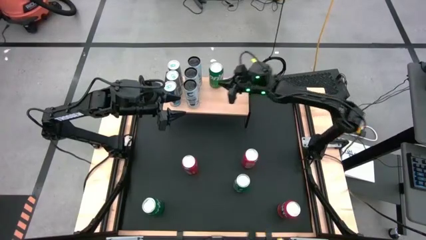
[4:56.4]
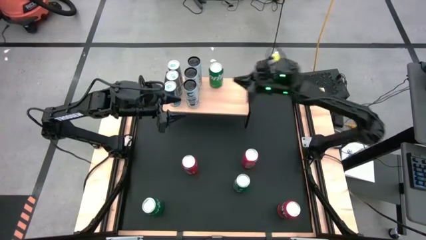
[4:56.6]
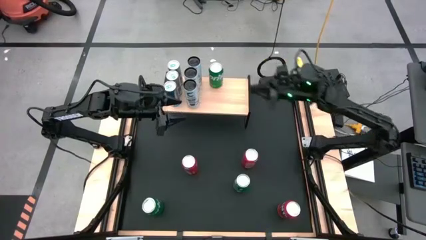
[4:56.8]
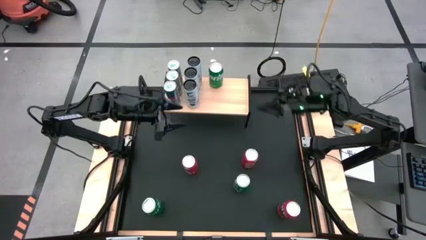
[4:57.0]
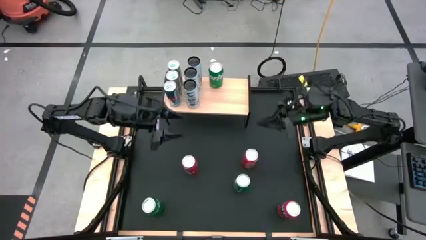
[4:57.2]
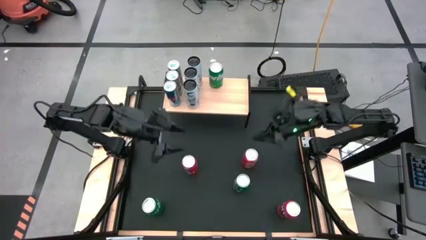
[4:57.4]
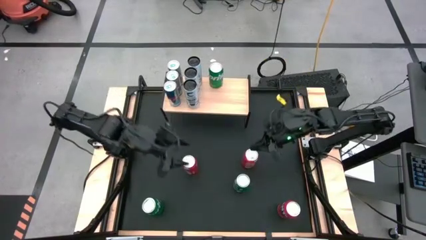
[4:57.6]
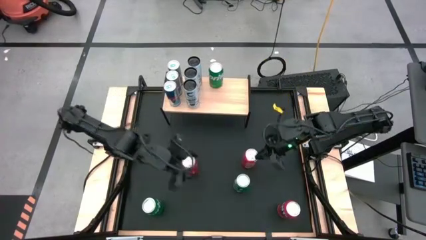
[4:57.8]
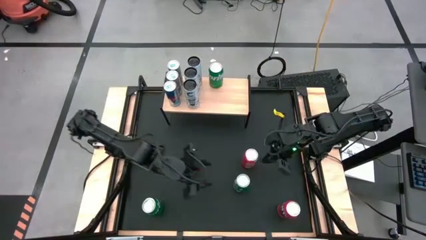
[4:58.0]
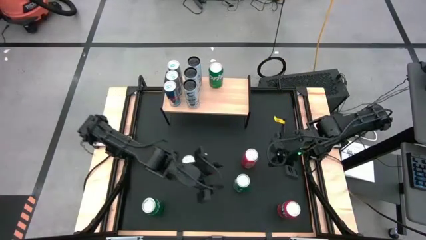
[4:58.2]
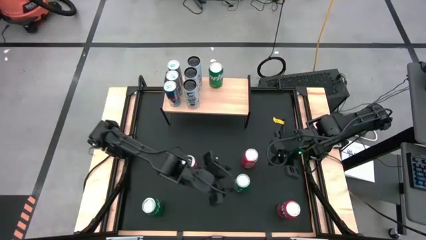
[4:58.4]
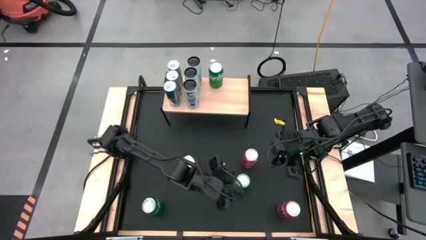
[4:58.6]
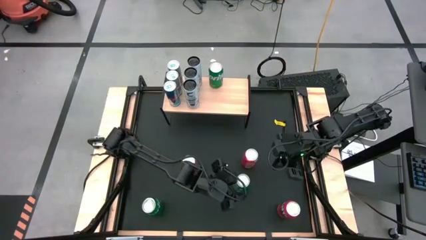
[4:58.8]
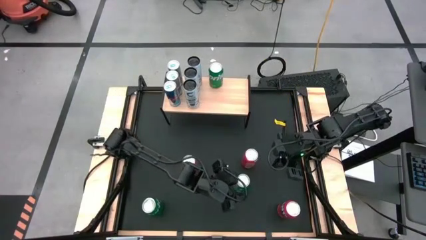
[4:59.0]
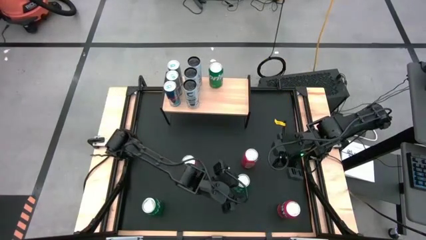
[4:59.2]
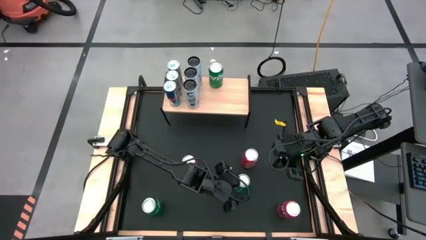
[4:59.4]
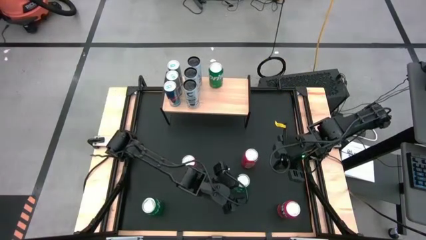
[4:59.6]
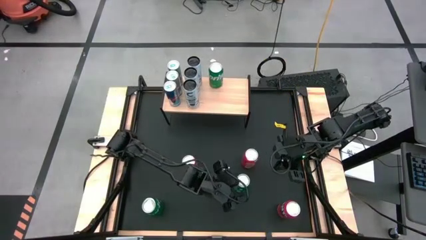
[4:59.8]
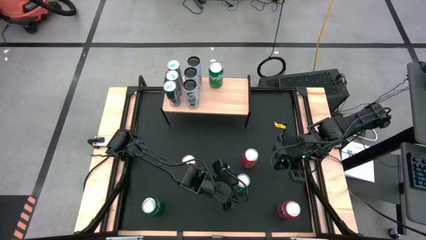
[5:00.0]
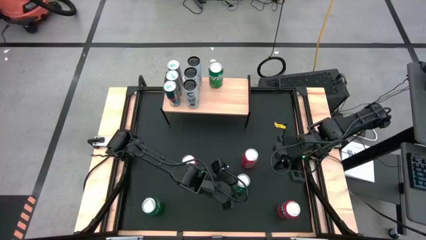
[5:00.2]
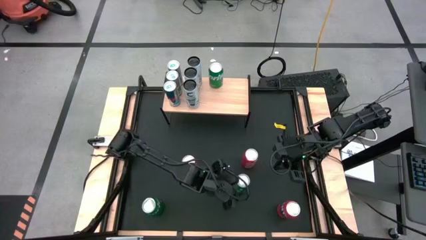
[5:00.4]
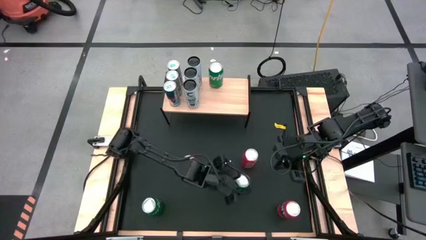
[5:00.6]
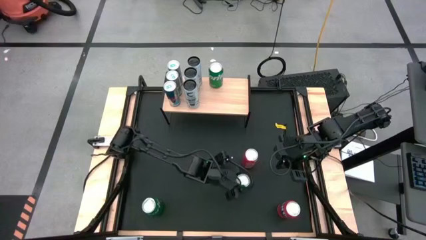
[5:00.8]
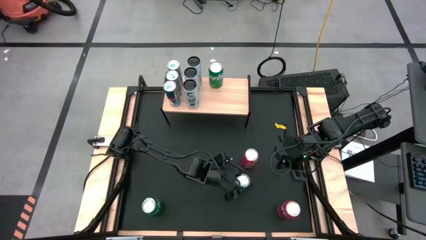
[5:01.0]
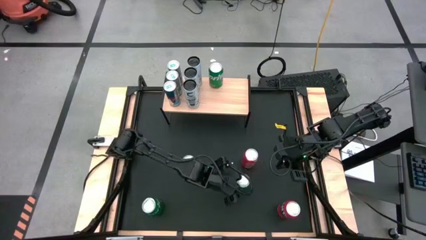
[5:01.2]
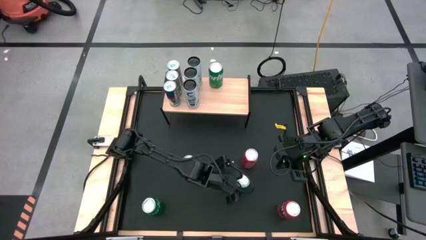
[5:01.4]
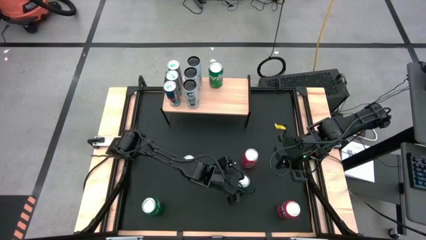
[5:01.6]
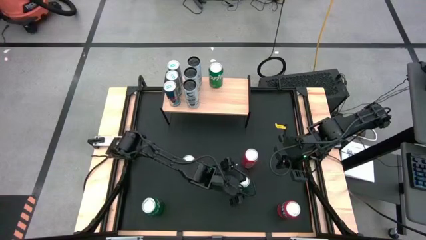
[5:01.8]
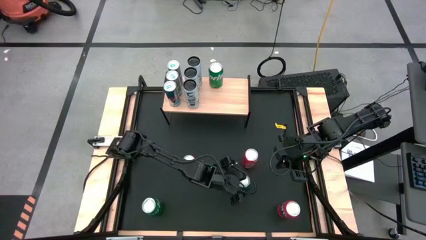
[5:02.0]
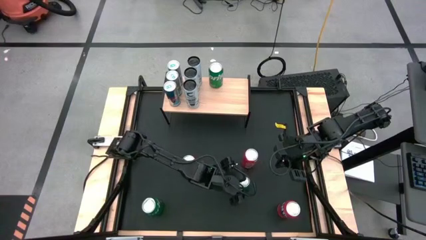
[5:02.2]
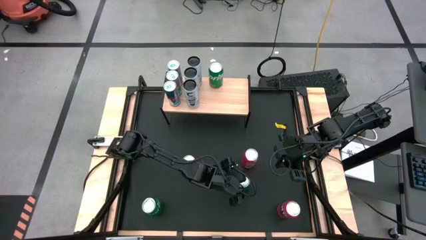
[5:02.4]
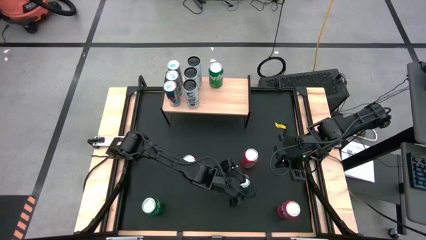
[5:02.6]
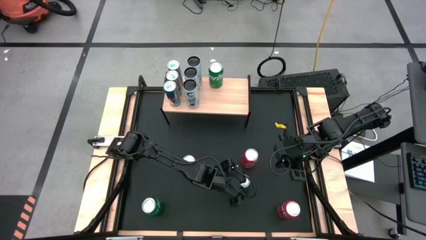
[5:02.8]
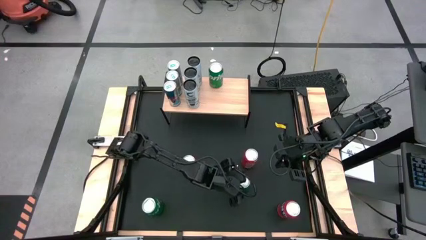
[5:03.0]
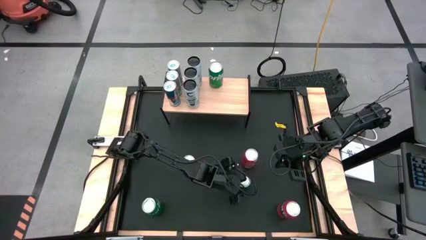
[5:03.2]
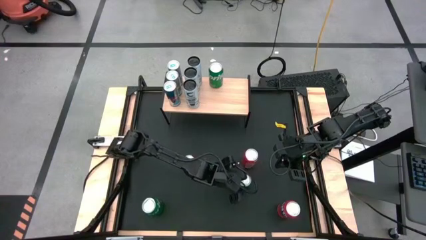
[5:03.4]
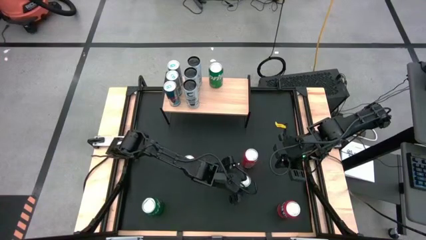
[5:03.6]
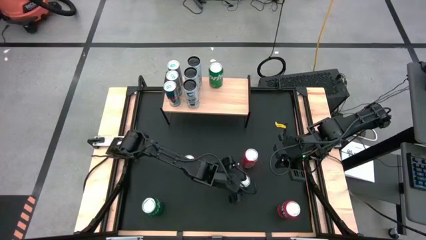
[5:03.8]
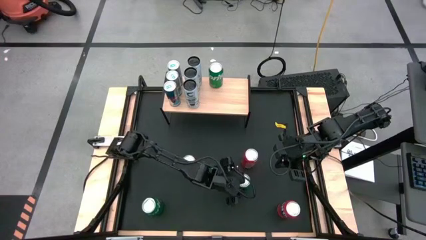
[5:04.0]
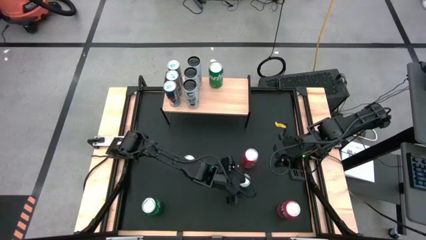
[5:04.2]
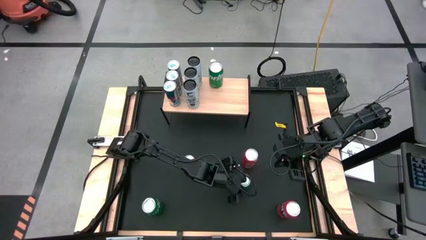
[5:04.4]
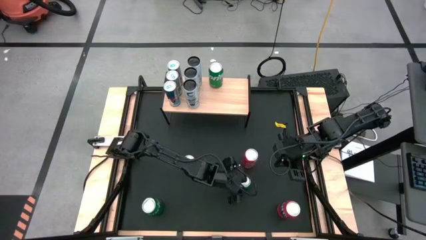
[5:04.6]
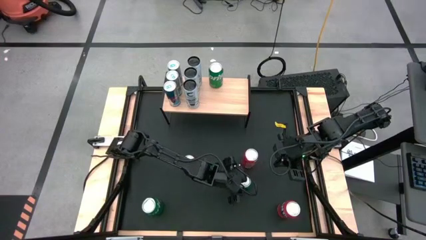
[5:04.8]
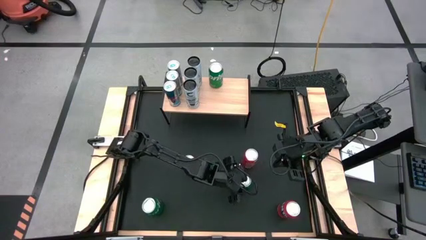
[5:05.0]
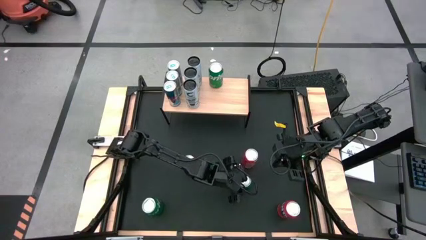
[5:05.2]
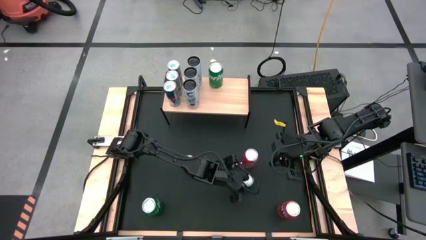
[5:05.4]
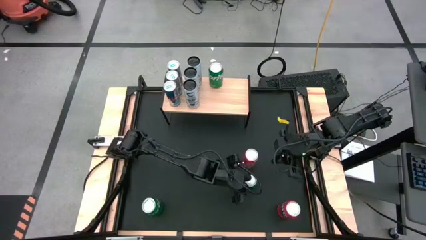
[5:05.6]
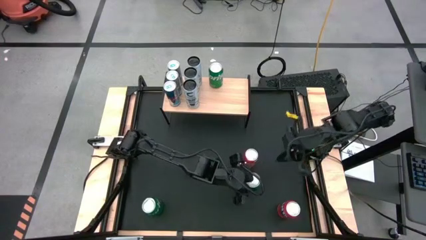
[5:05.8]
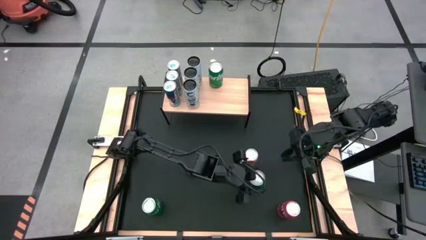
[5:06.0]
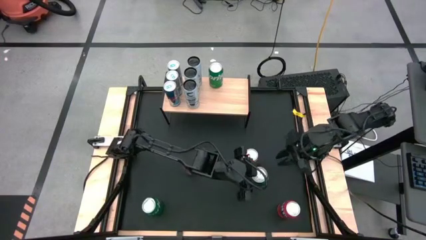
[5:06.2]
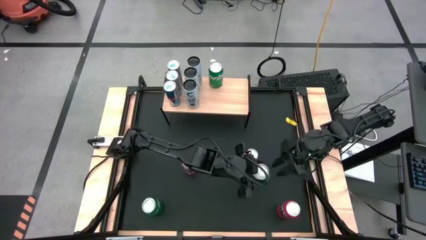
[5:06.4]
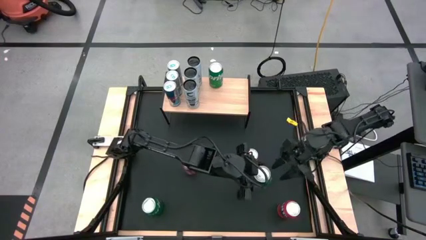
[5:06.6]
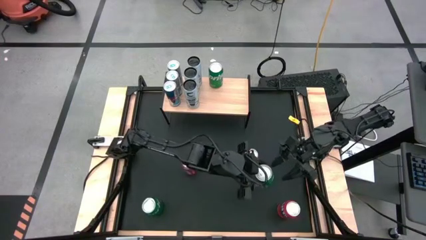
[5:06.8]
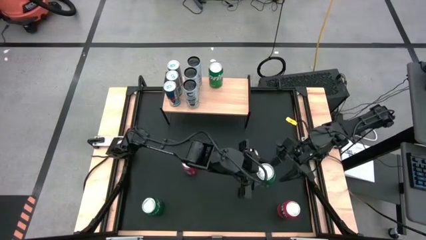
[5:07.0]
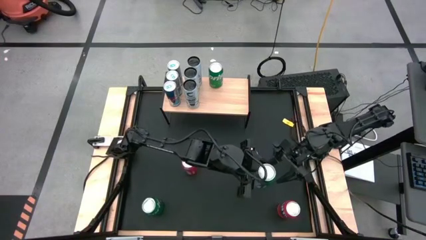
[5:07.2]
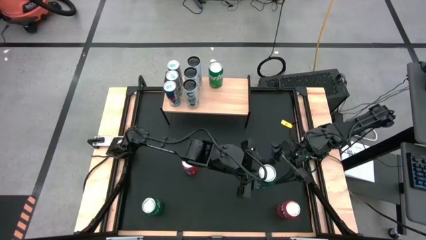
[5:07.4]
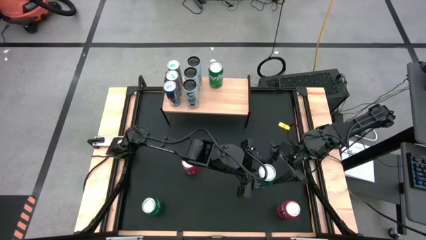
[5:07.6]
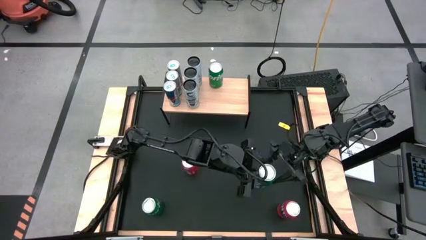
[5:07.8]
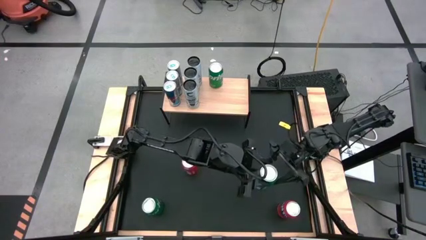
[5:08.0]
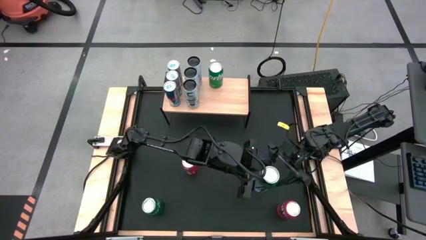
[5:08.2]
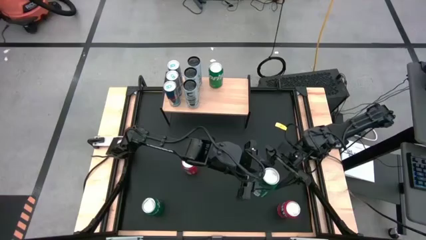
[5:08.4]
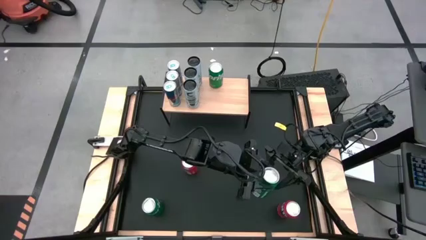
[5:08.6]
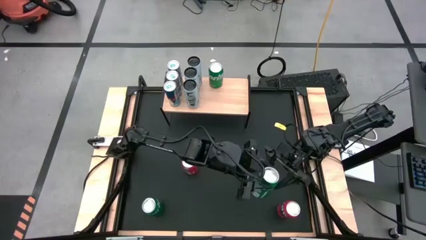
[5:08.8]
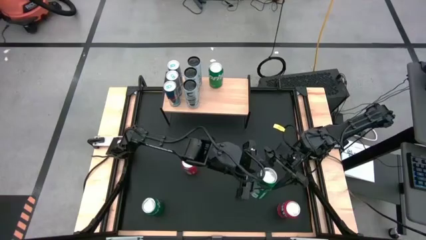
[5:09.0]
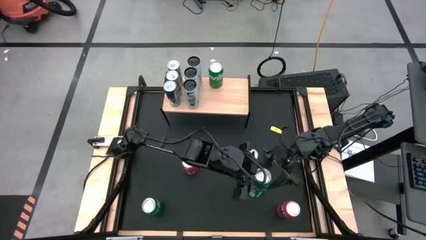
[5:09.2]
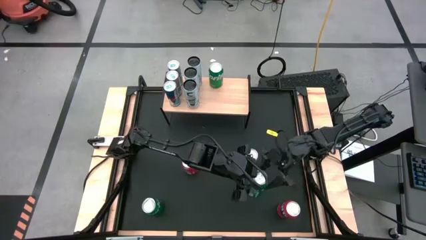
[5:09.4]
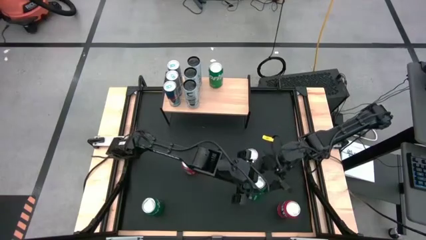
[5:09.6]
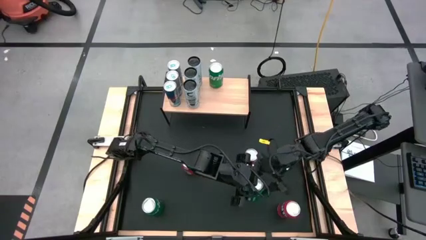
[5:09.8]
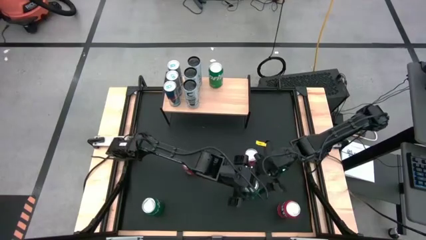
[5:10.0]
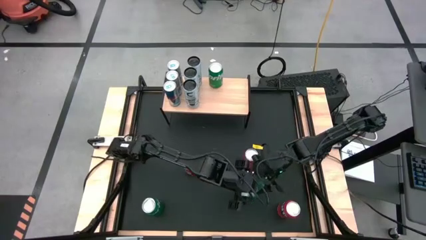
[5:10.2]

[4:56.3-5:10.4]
Task: Place canned beverage on shelf
Put the top green soda can on the shelf

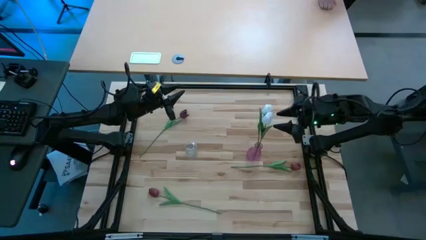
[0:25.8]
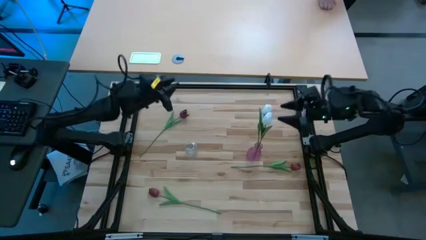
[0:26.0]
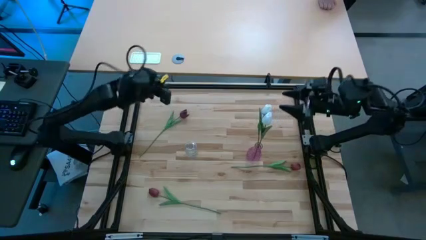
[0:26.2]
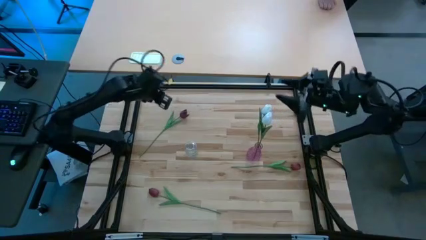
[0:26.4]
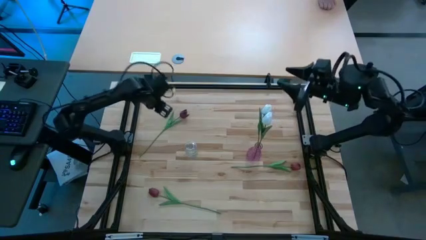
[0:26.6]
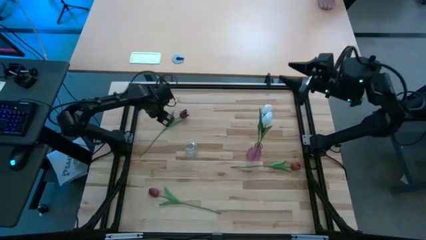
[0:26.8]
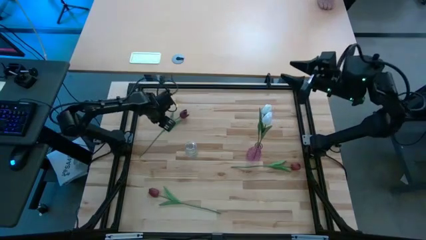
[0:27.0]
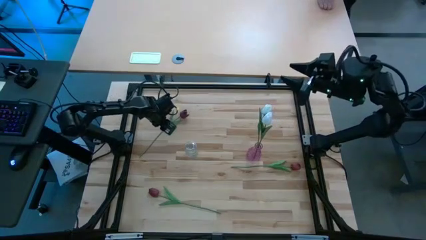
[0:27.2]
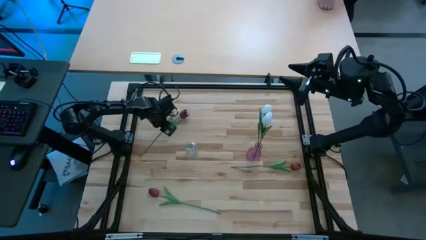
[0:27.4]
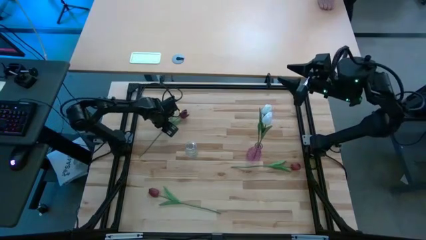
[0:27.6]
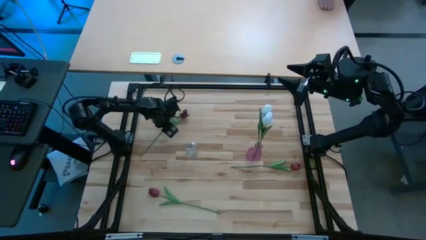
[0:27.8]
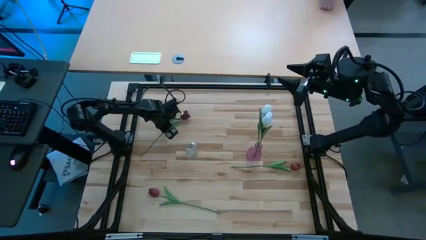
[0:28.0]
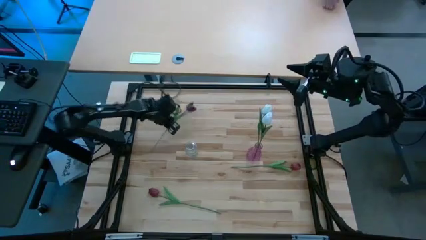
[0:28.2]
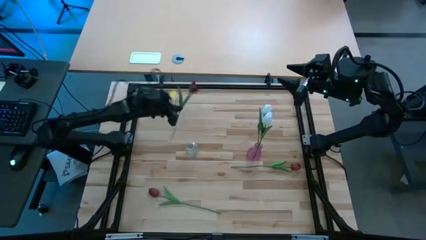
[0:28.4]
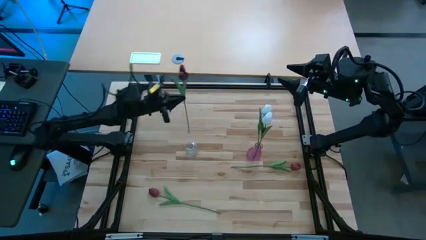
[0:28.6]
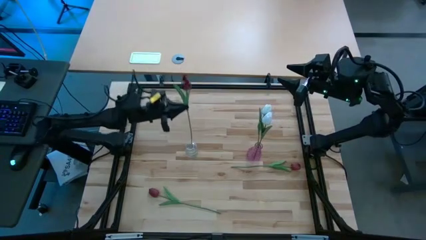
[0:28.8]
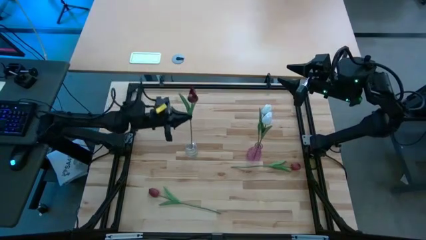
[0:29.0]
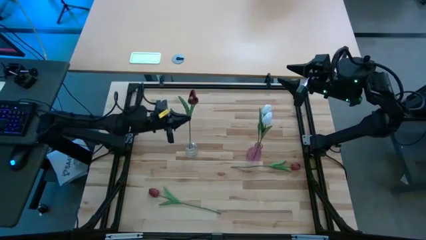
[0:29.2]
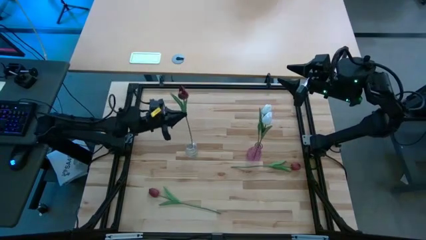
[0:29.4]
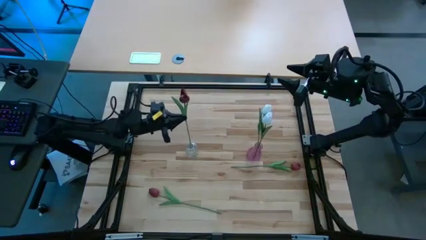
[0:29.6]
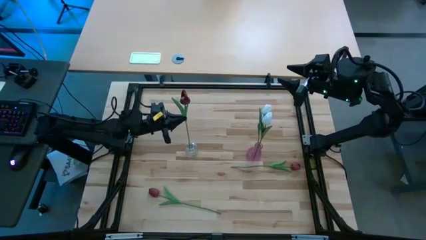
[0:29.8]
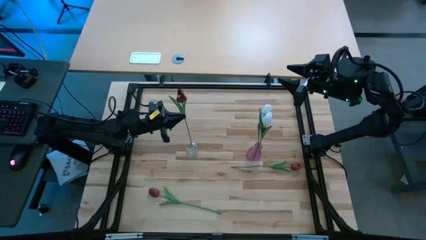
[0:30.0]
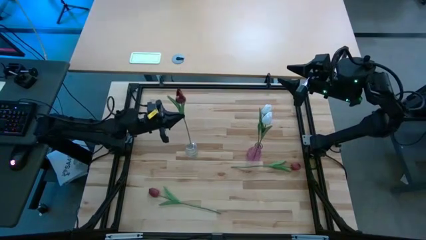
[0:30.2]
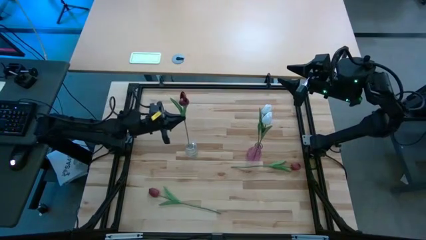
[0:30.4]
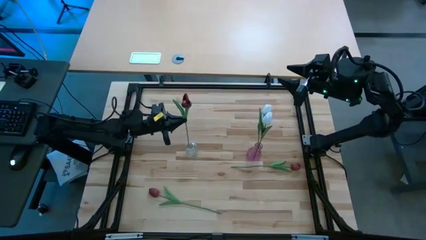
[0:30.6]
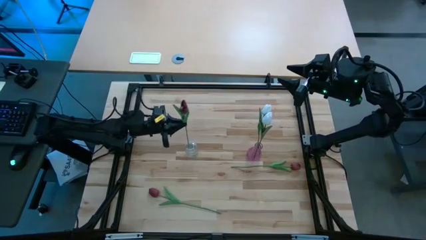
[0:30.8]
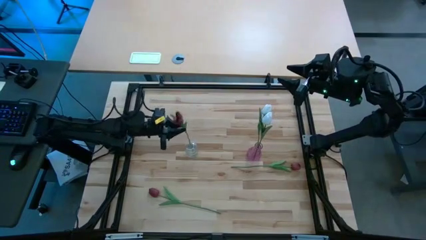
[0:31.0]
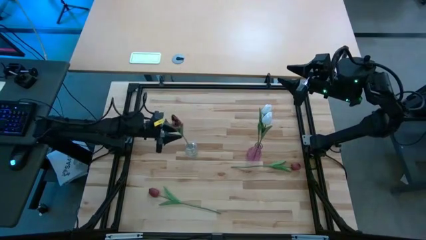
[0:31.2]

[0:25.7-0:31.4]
Task: Sort flowers into vase by color
Put the top left red flower into the transparent vase
